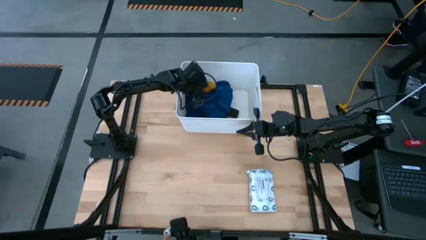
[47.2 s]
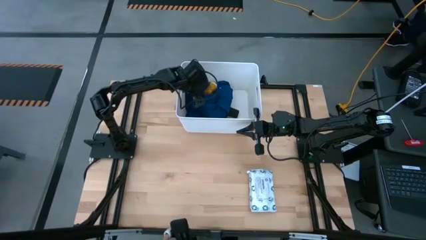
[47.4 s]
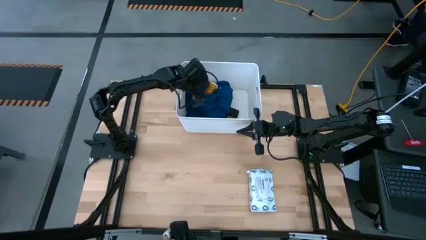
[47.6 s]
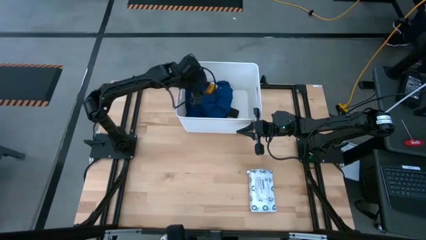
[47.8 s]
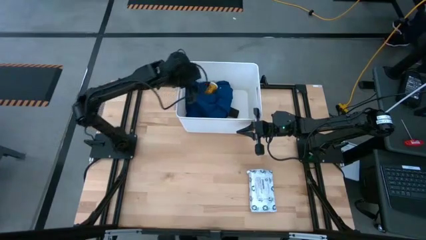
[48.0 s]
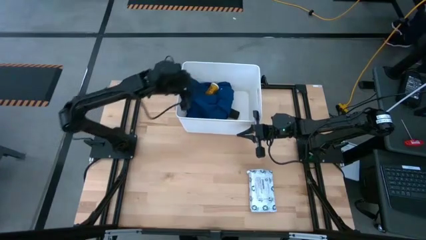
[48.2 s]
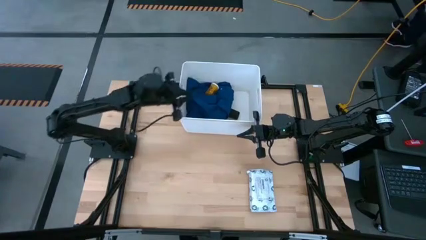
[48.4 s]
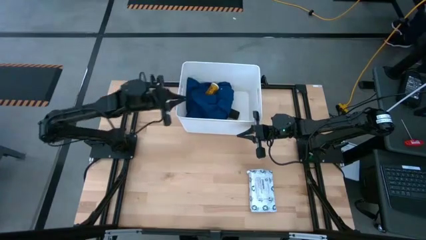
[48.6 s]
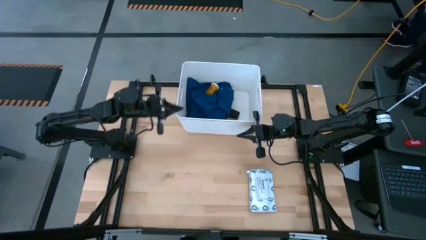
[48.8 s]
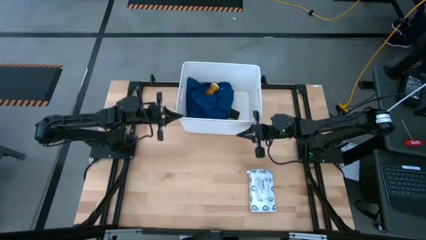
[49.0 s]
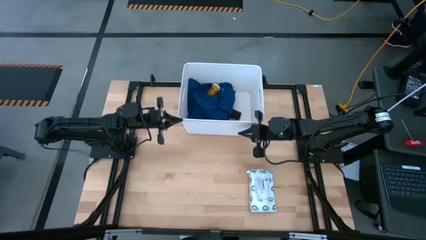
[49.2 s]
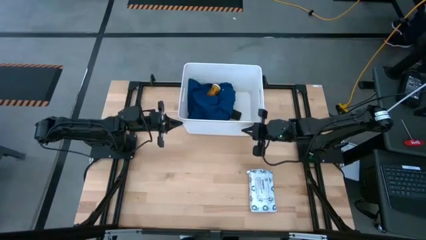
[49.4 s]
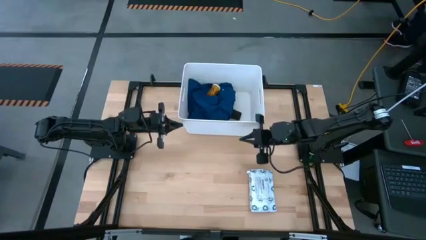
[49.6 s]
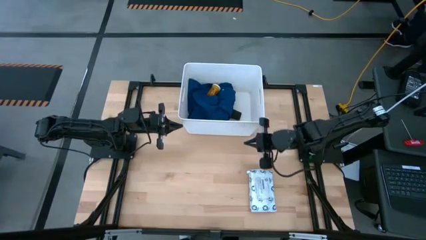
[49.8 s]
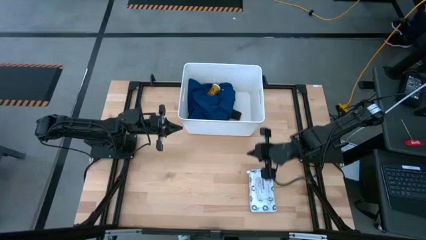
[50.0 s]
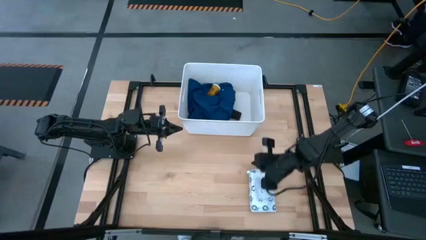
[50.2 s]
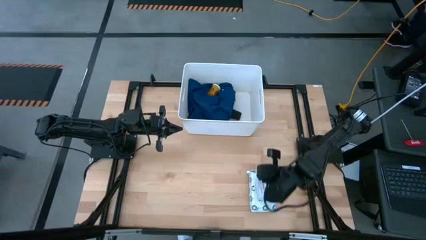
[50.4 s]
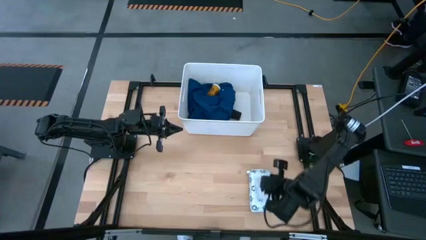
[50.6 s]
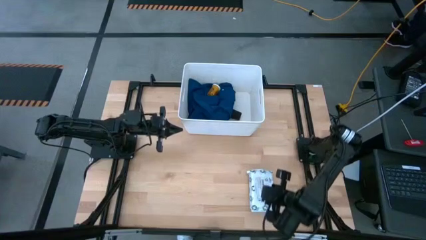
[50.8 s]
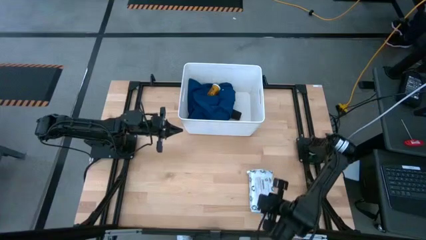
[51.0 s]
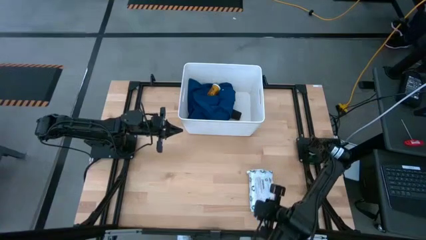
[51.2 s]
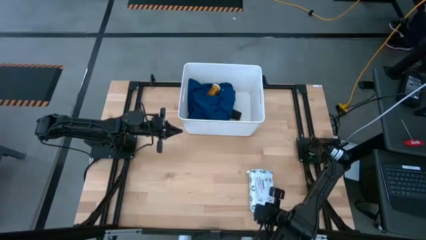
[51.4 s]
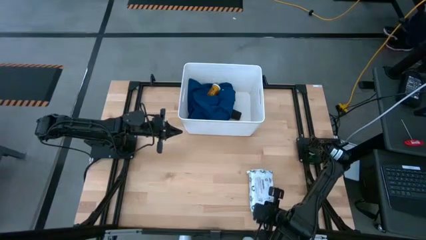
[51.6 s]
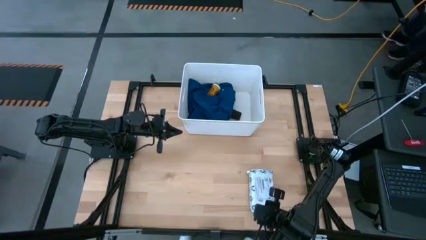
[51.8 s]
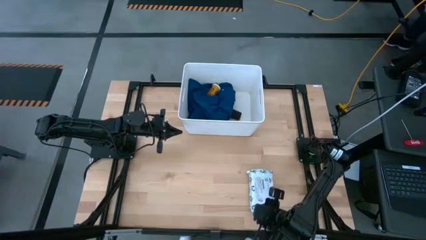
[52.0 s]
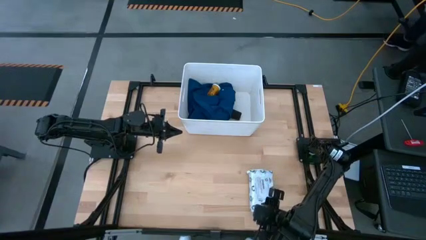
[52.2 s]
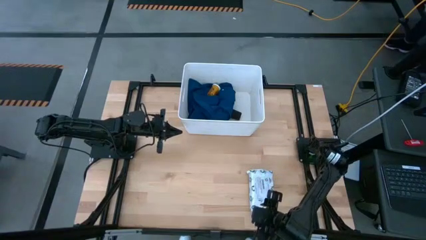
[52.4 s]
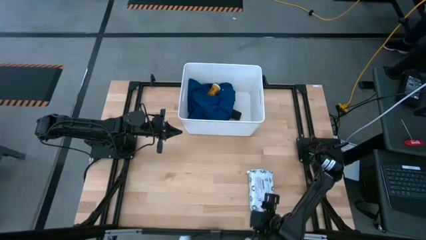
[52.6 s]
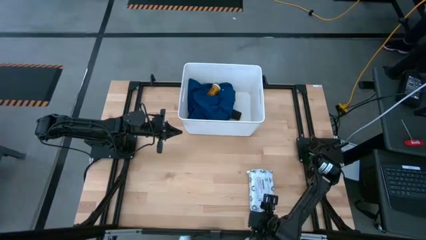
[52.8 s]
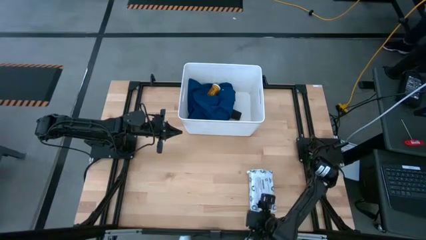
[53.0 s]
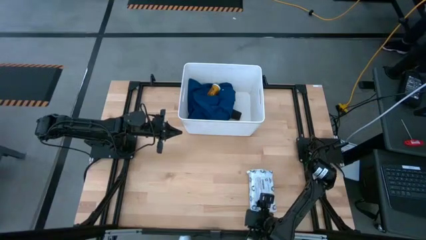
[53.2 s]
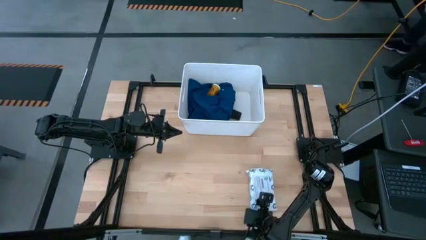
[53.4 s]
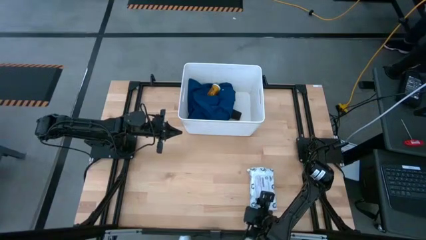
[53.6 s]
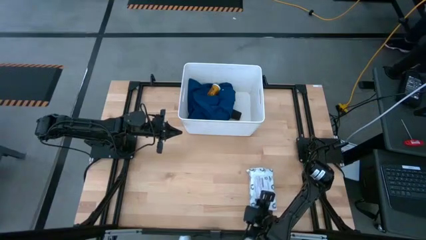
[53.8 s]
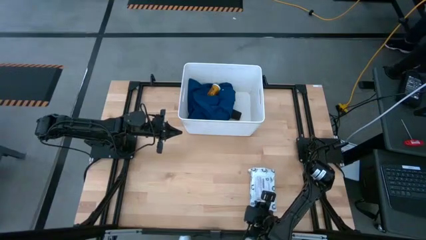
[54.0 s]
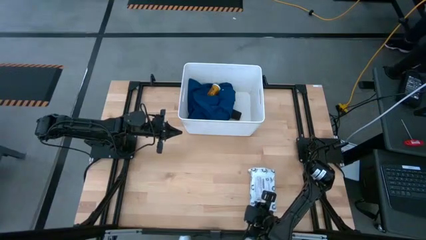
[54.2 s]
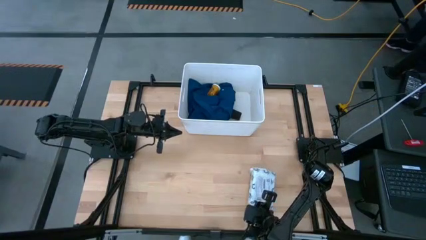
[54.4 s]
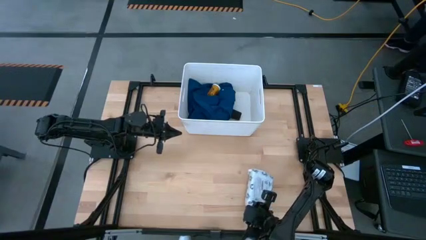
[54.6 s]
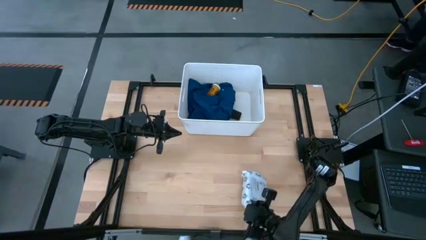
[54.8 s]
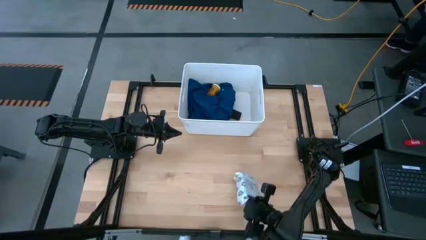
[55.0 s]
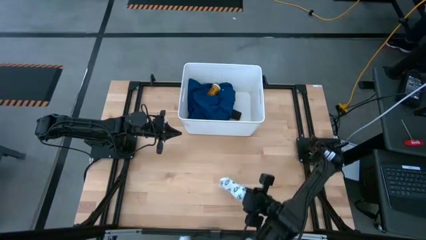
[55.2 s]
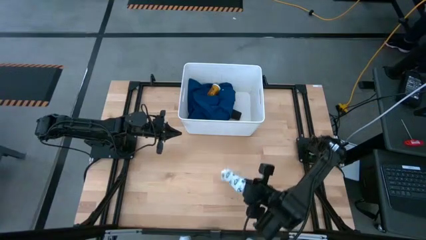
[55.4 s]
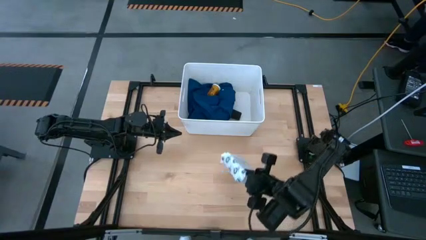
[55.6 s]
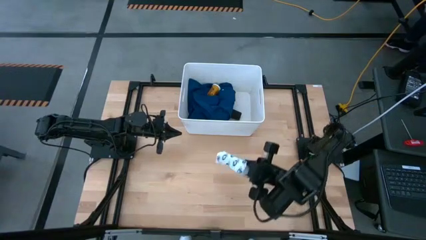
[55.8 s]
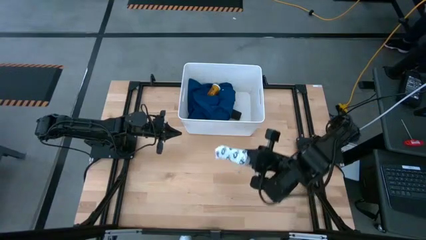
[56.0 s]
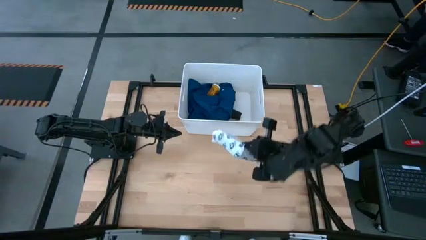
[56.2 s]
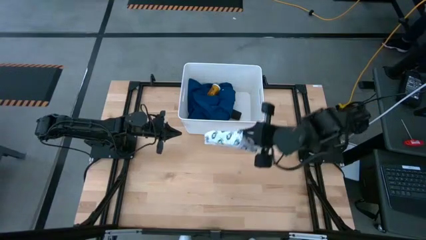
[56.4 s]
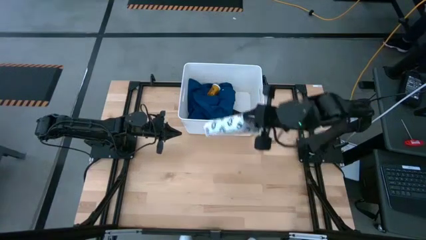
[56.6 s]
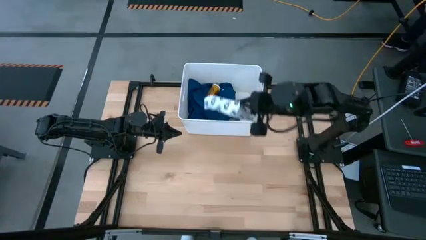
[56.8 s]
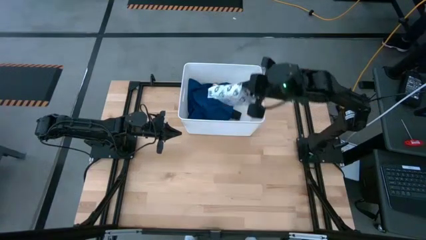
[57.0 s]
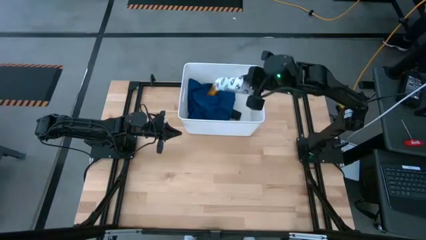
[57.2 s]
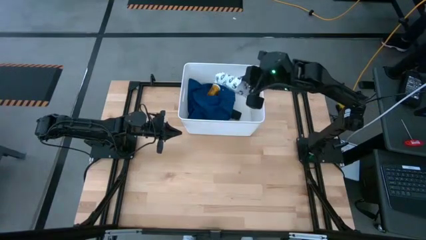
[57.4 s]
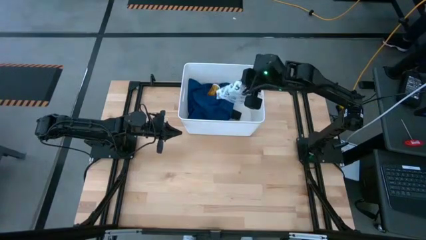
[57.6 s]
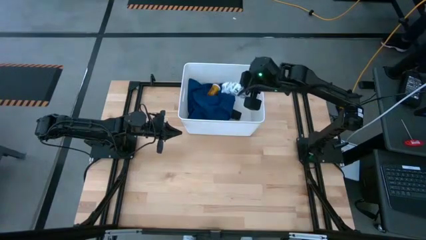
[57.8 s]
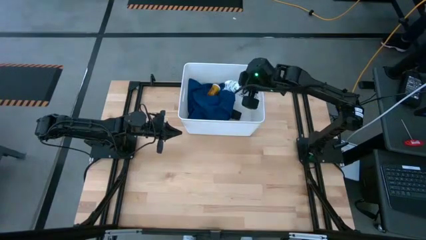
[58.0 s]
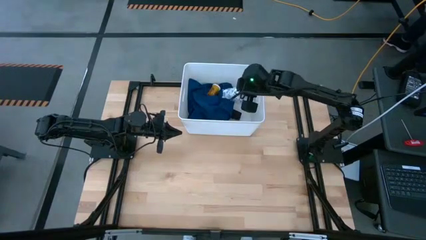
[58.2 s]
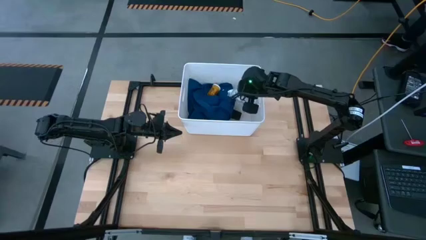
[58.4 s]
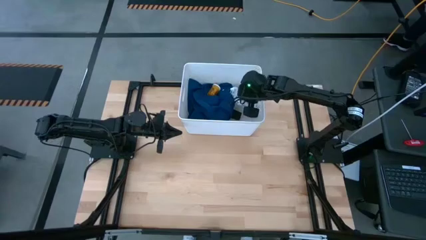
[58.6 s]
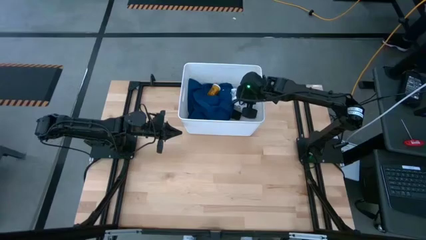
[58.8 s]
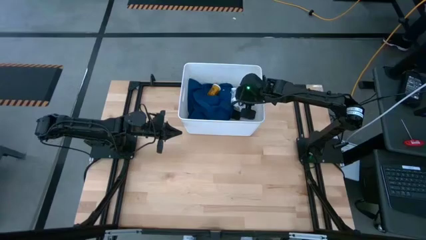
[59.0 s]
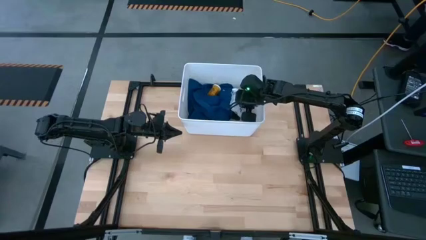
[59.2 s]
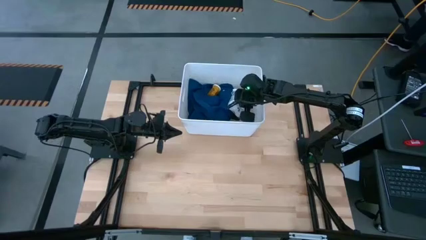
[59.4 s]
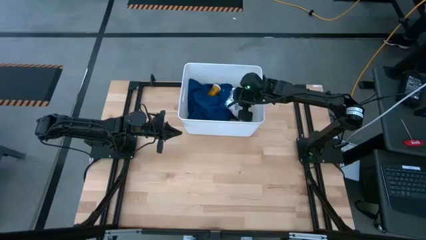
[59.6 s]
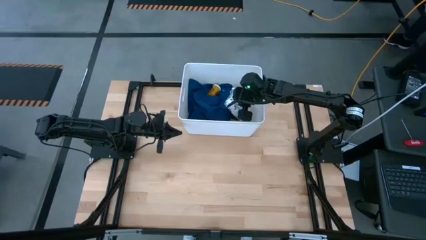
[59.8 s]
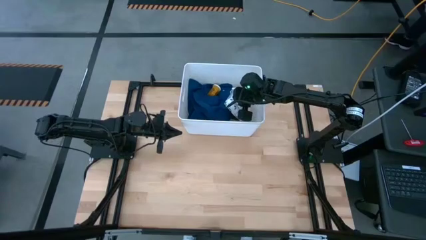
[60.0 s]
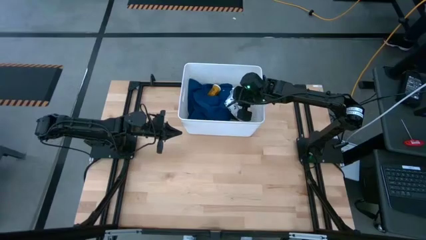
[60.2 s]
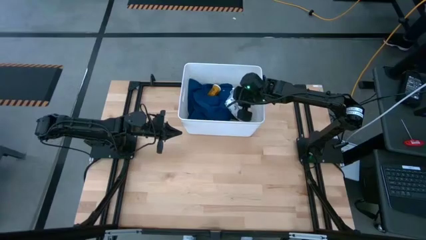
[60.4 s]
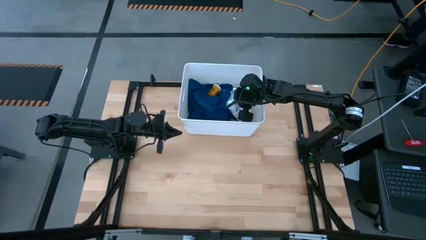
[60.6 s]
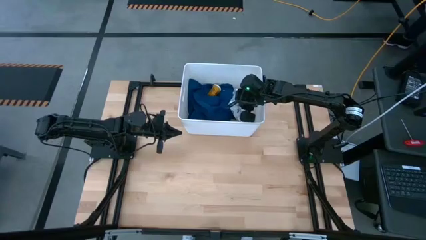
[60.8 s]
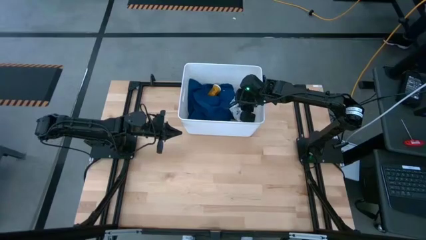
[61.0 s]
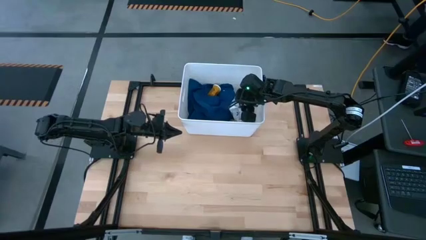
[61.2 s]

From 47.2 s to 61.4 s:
Task: Pick & place medical supplies in basket/bin
Put the mailer bag into the white bin
